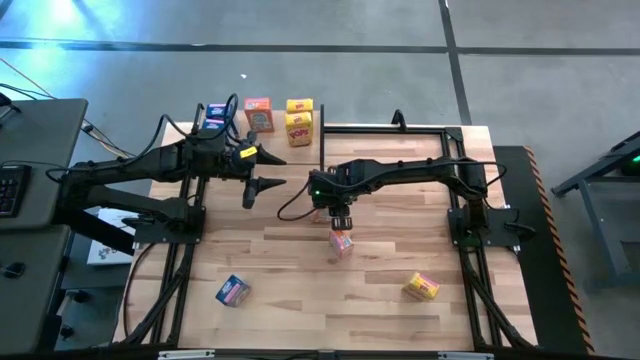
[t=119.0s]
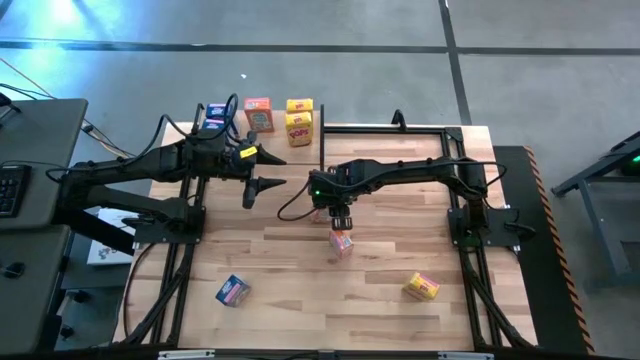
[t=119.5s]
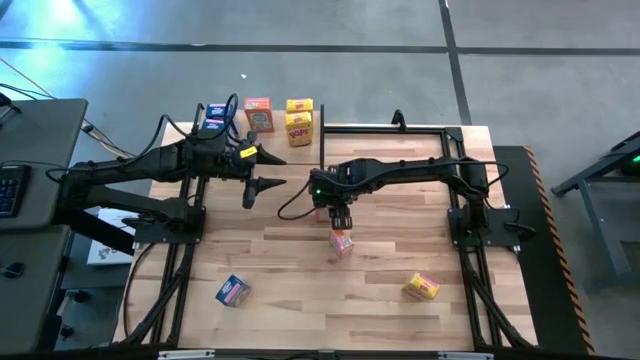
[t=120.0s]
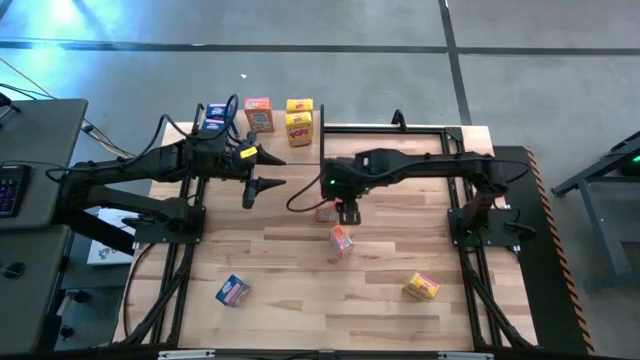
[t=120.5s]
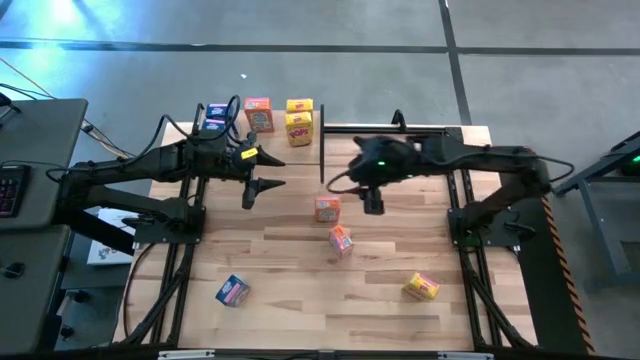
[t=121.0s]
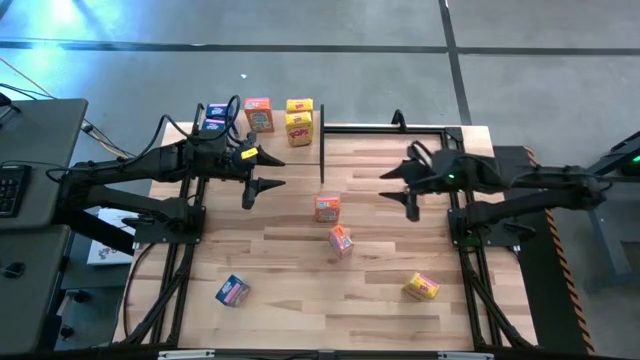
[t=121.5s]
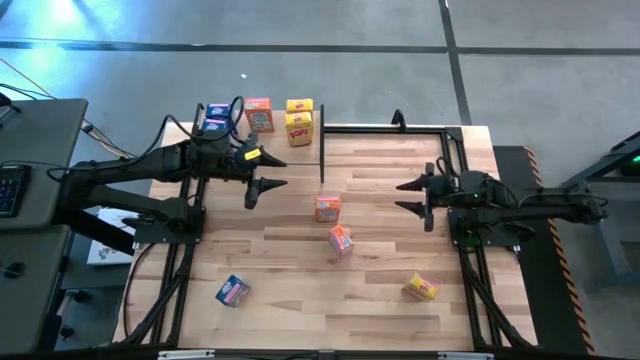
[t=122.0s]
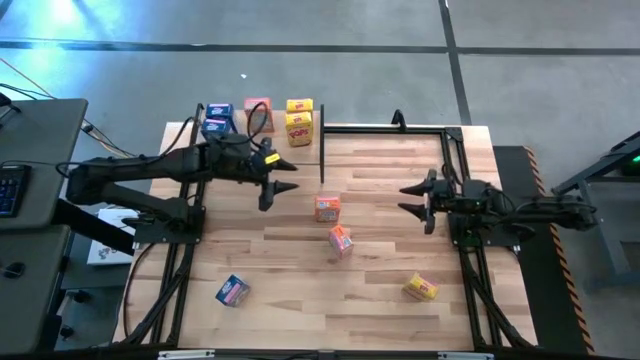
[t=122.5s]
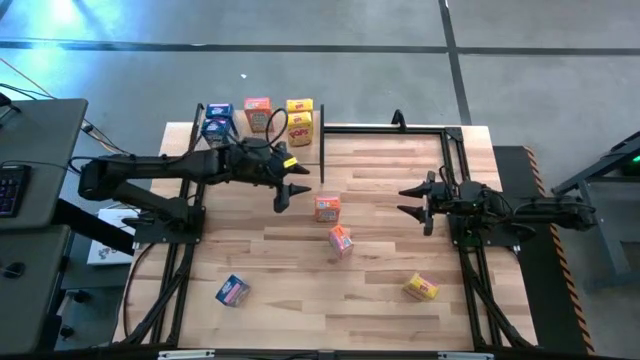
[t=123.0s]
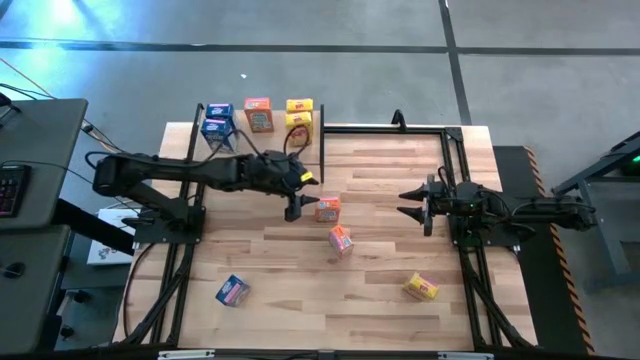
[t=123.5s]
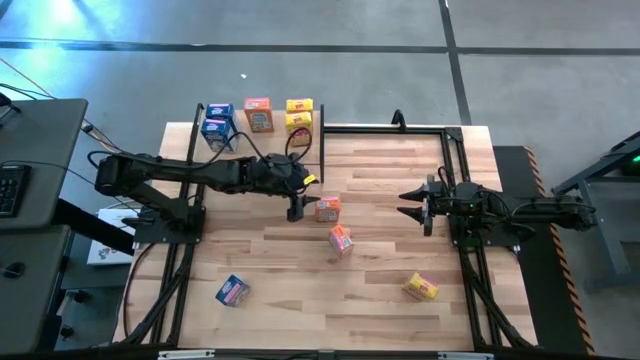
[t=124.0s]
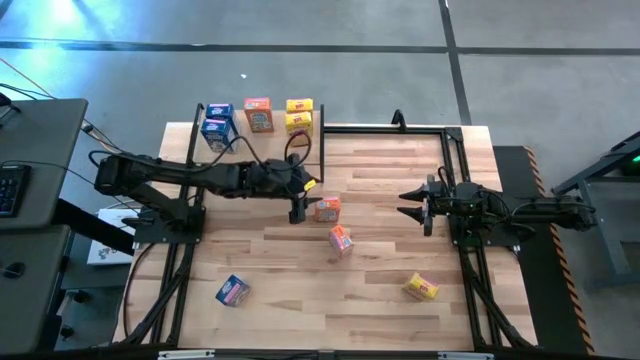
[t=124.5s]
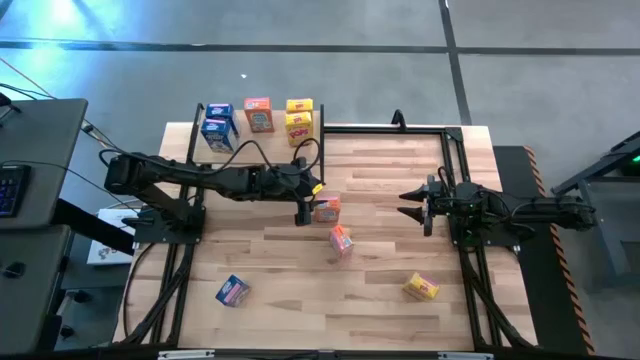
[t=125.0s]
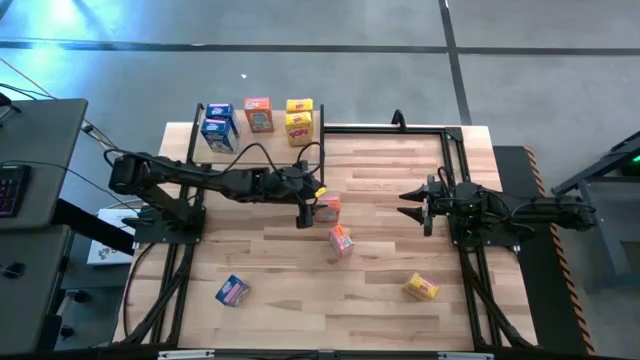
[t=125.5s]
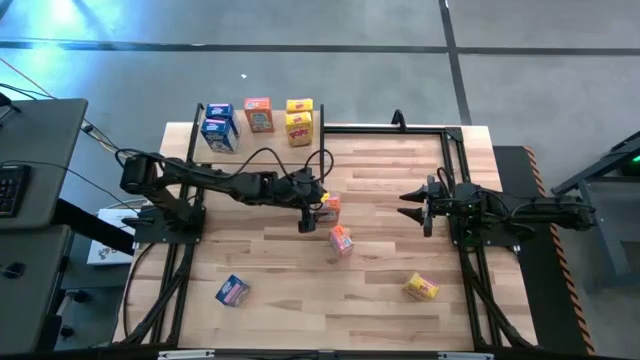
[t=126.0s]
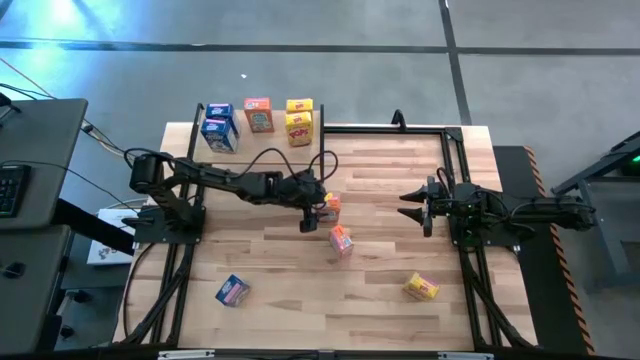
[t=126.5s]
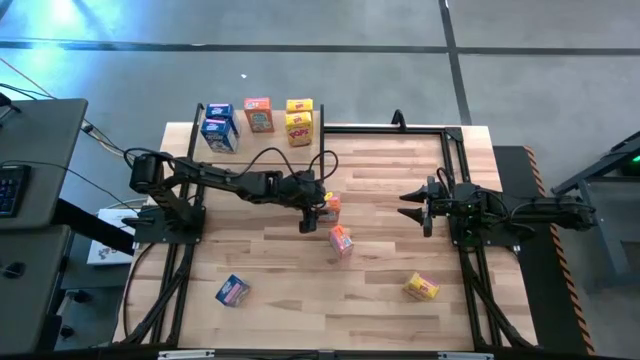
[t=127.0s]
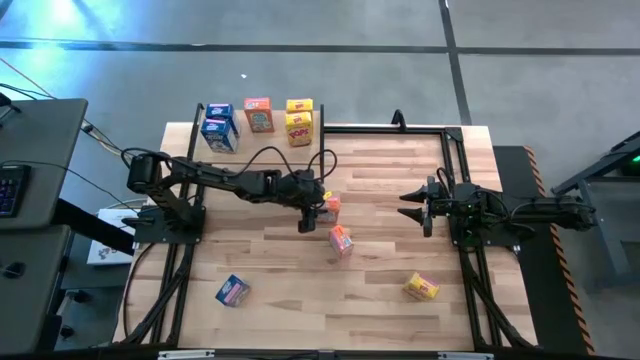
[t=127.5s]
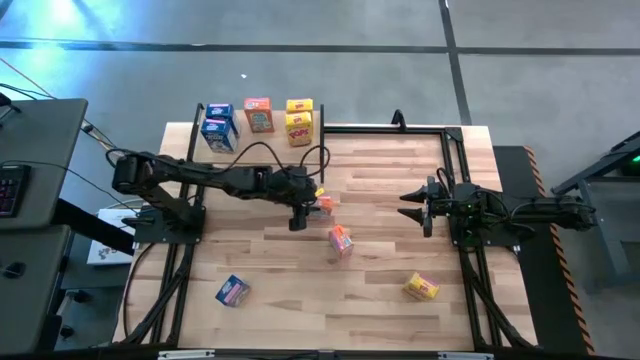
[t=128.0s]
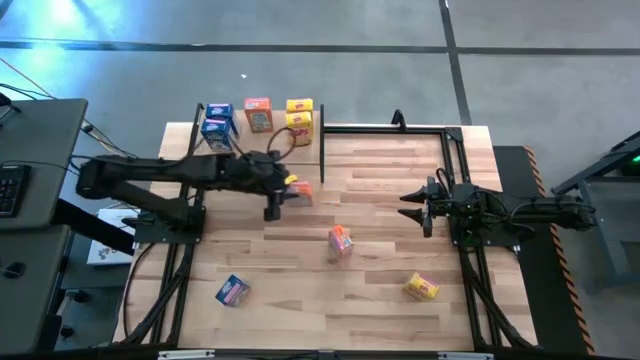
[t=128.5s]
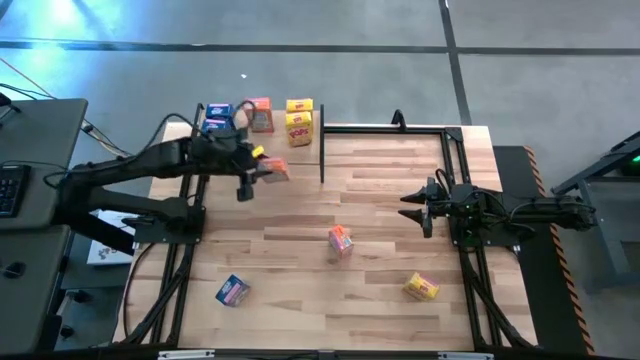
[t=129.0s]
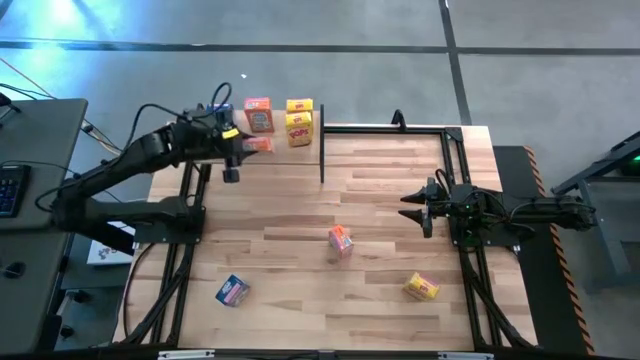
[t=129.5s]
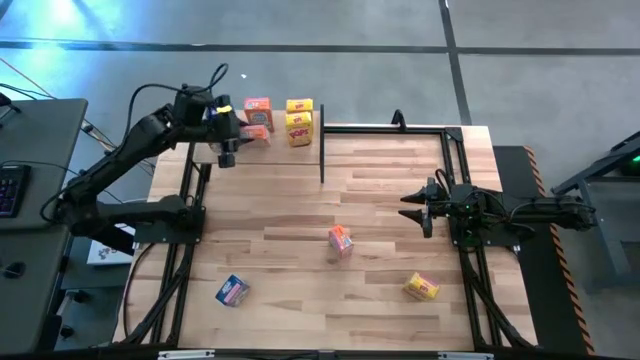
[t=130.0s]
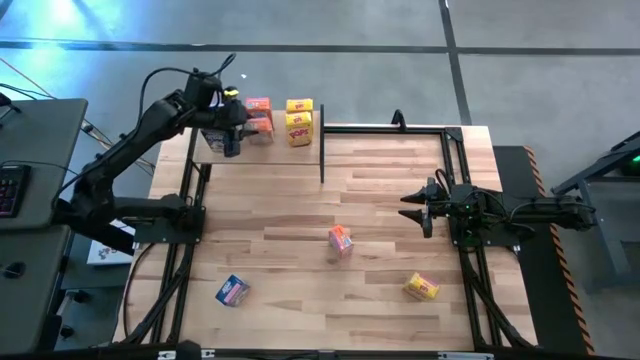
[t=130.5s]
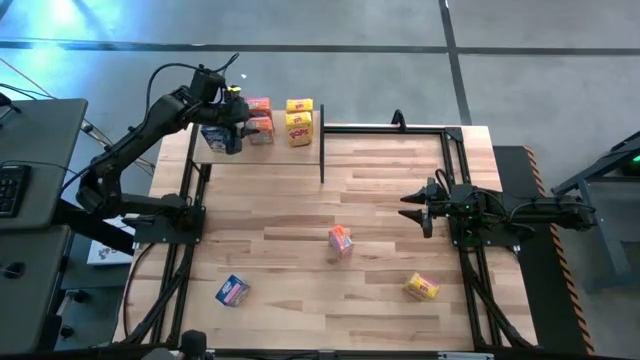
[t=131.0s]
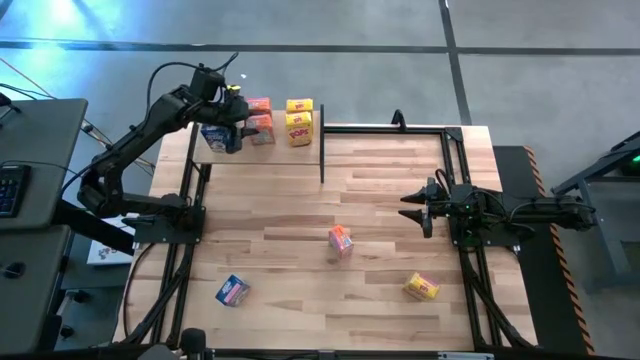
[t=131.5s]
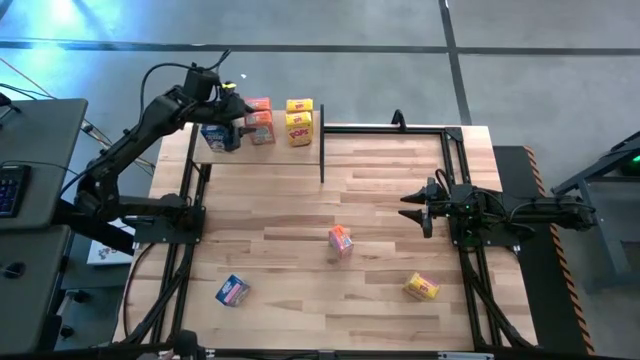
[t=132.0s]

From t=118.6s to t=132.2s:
Task: Stack cereal on shelf
Put the top orange cereal box on the shelf aligned with the other orange cereal box

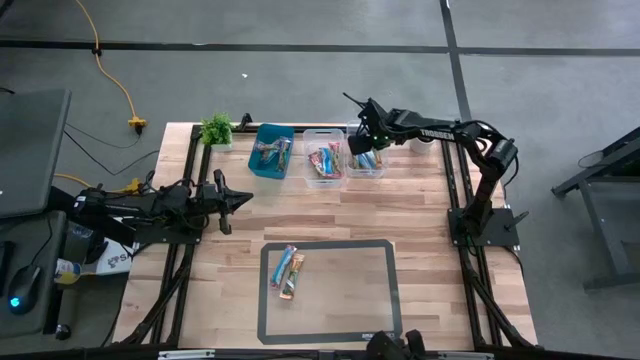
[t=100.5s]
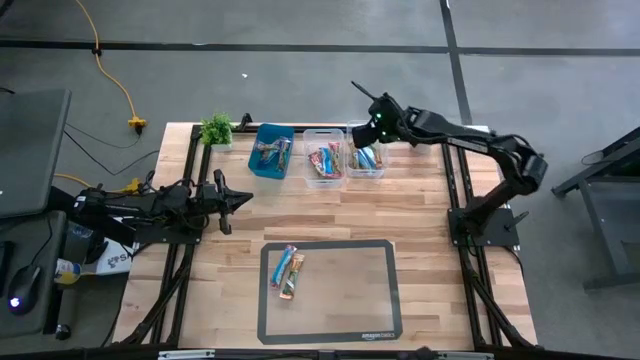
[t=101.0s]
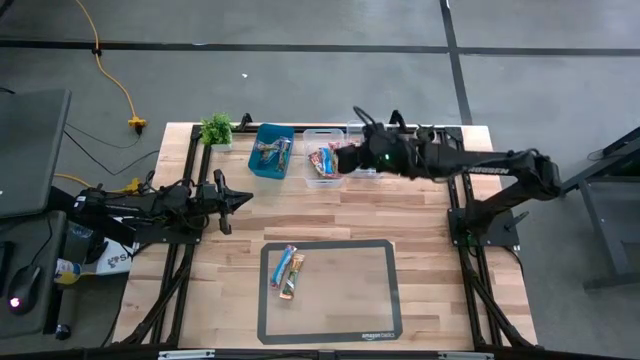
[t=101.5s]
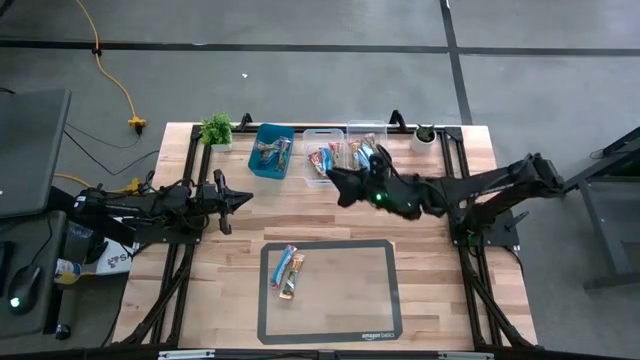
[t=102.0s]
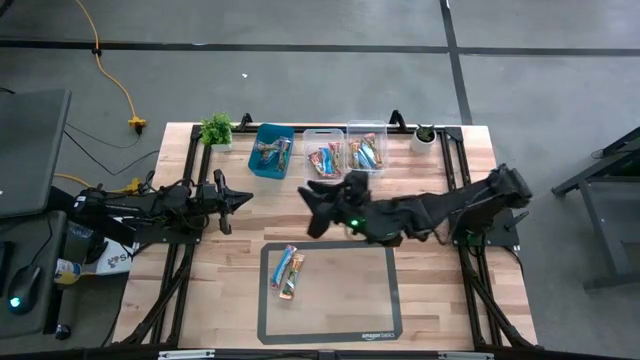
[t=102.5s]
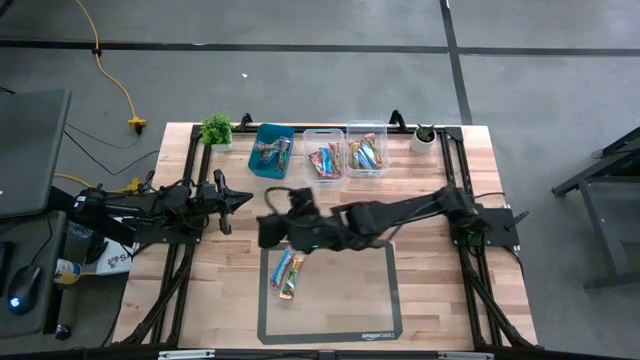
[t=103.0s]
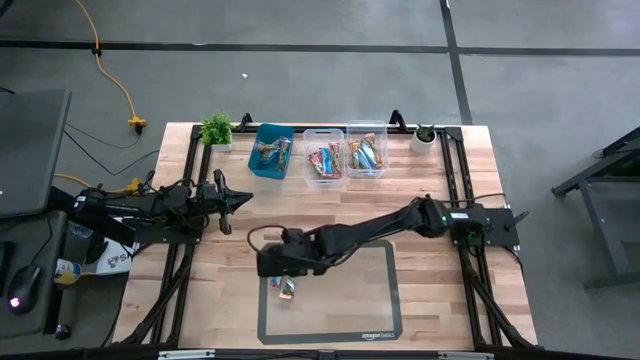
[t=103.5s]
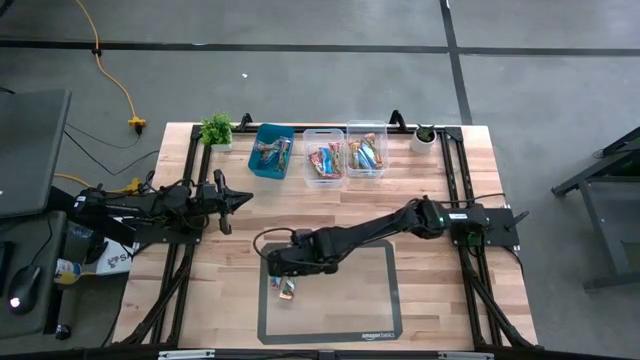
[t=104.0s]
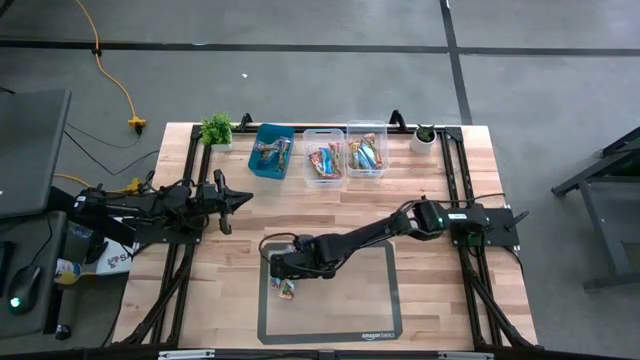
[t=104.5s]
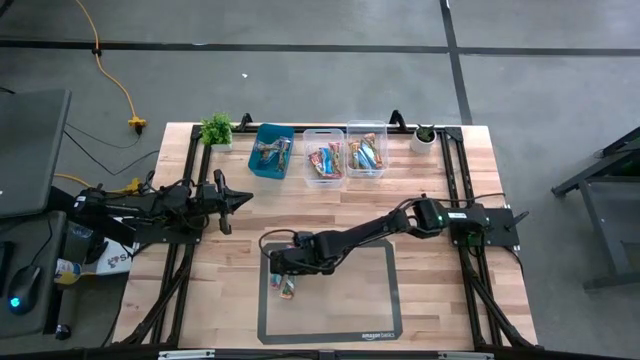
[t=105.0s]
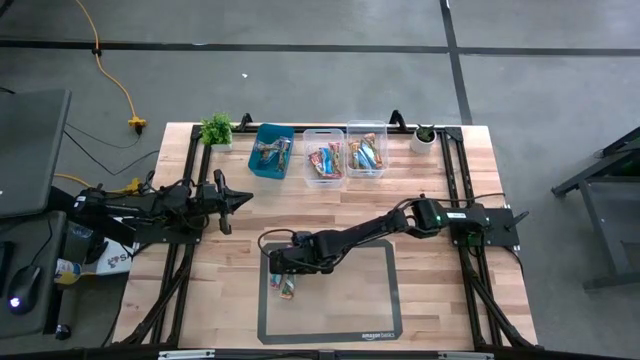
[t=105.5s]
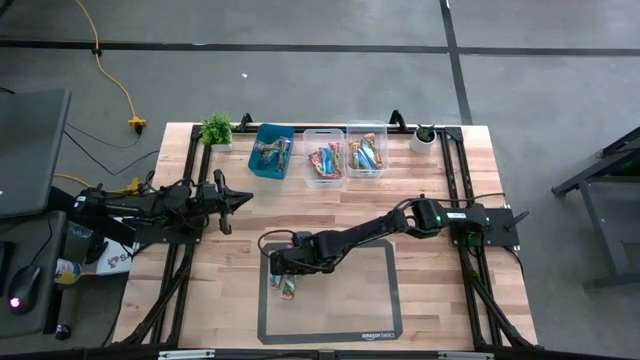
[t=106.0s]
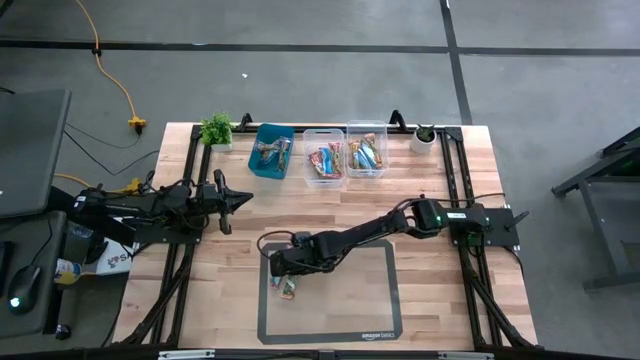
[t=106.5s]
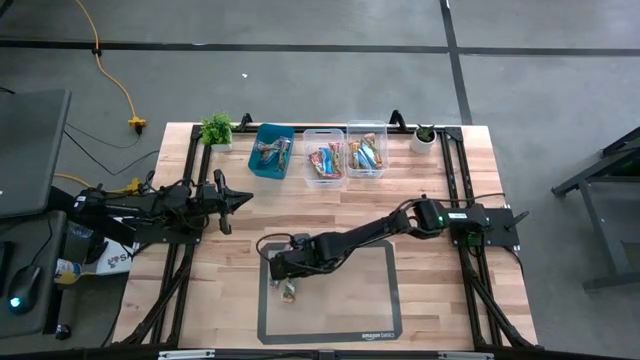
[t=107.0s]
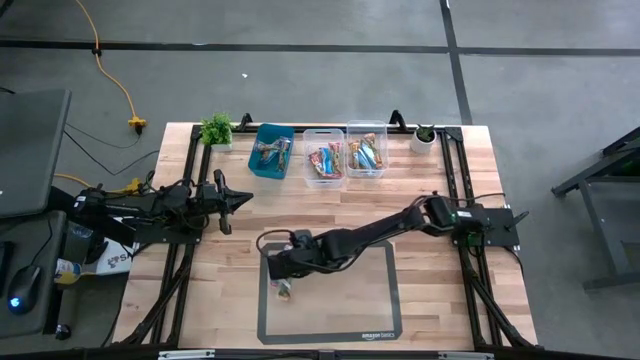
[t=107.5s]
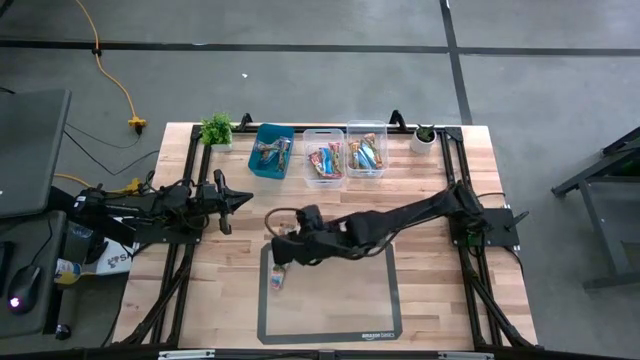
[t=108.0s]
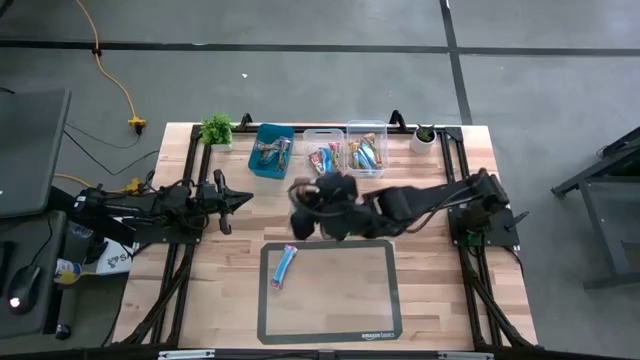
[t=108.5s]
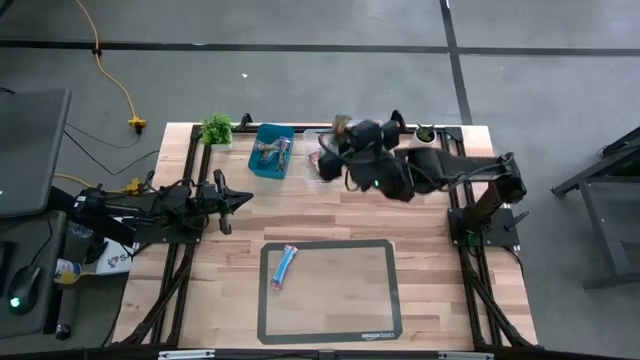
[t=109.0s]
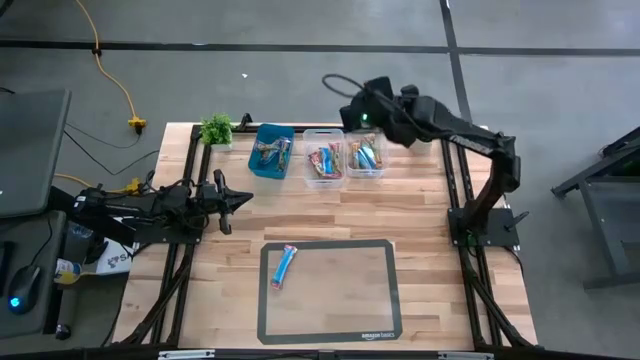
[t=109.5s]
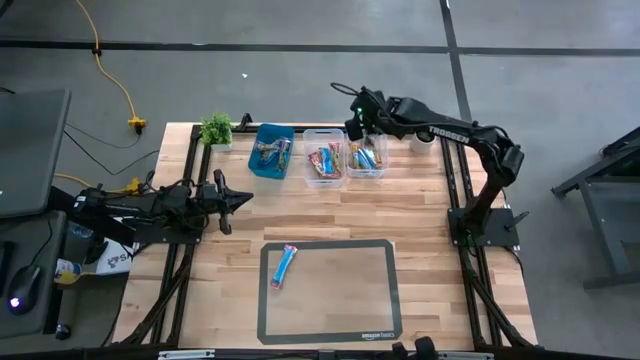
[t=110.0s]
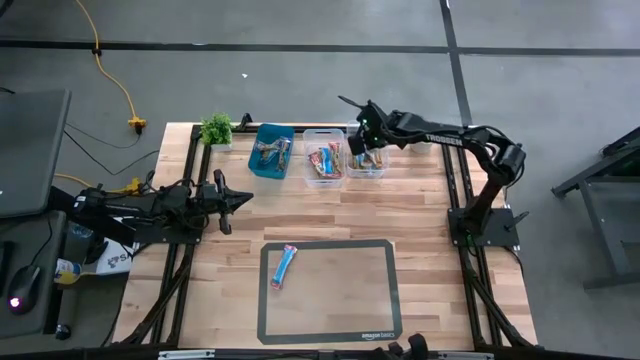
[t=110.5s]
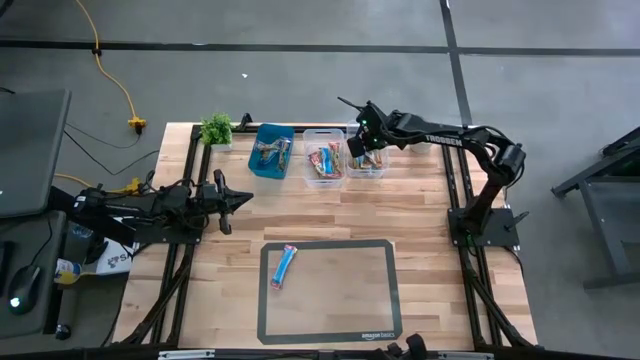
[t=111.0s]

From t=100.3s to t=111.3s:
Task: Pick and place Granola Bars by type
Put the yellow granola bar into the right transparent bin
